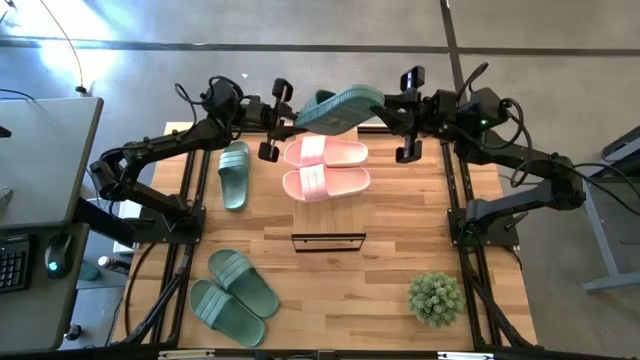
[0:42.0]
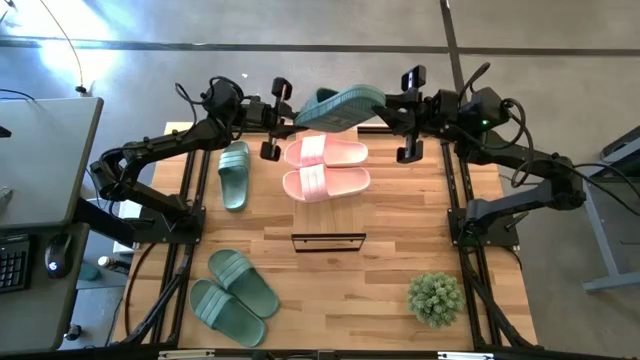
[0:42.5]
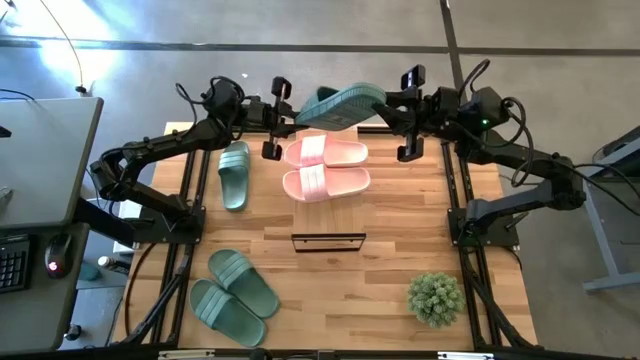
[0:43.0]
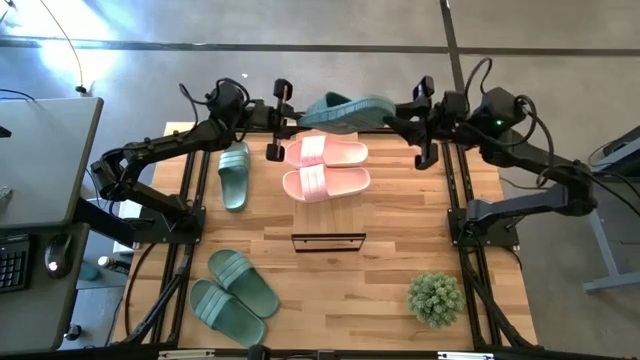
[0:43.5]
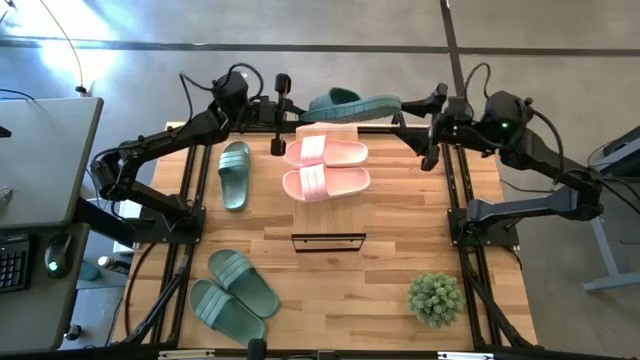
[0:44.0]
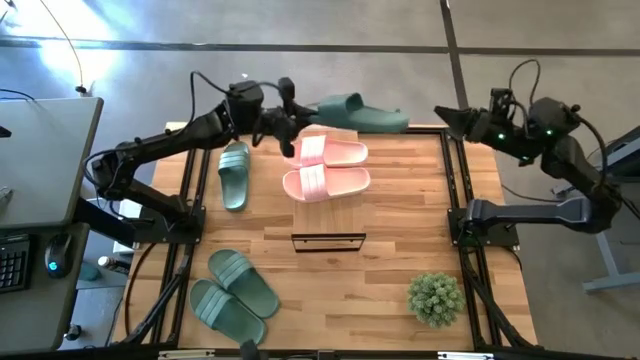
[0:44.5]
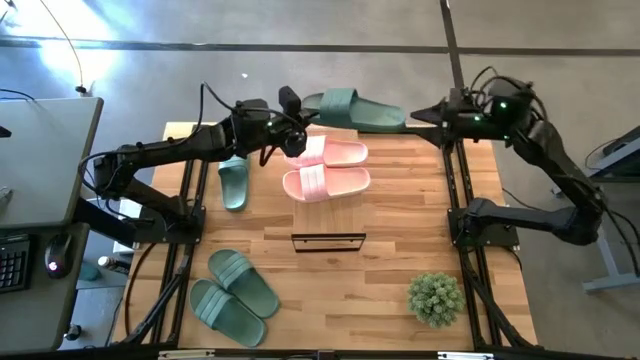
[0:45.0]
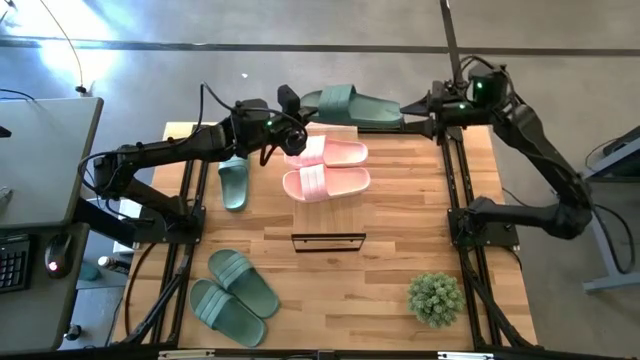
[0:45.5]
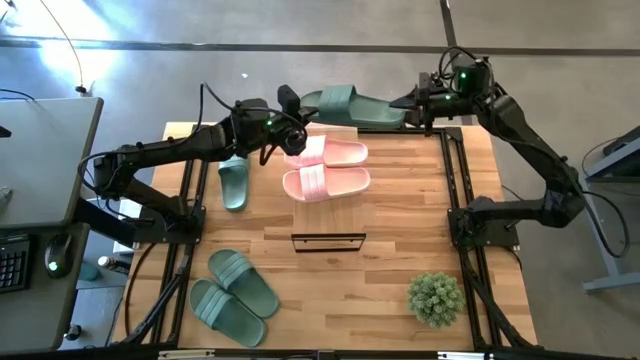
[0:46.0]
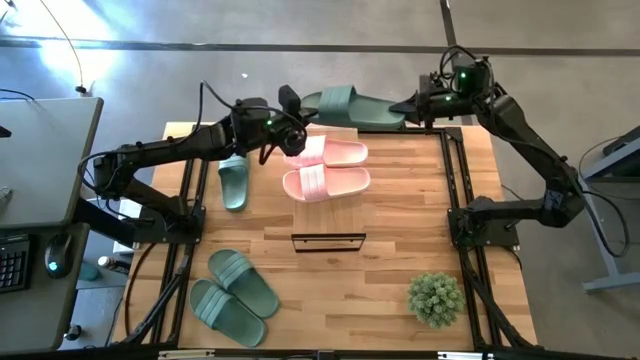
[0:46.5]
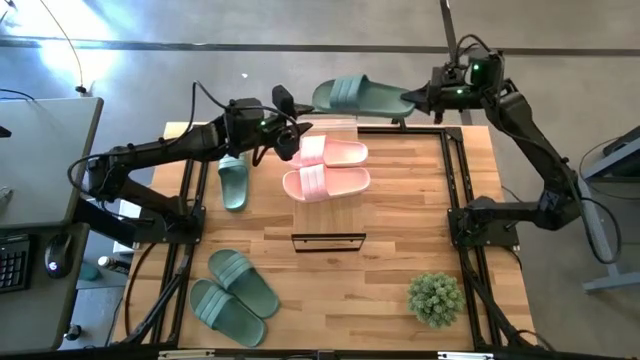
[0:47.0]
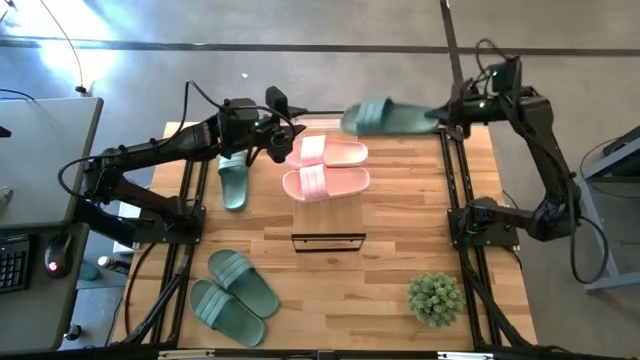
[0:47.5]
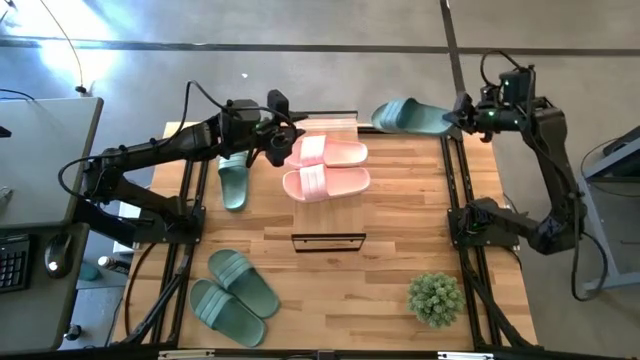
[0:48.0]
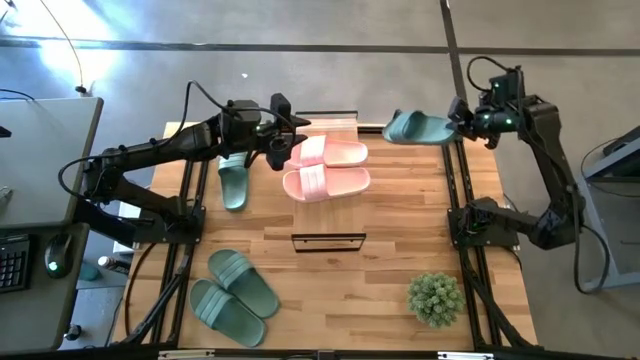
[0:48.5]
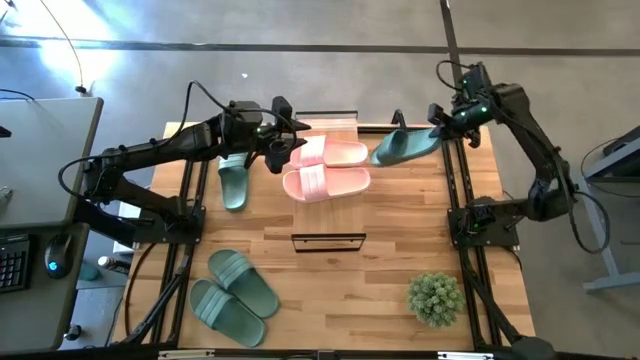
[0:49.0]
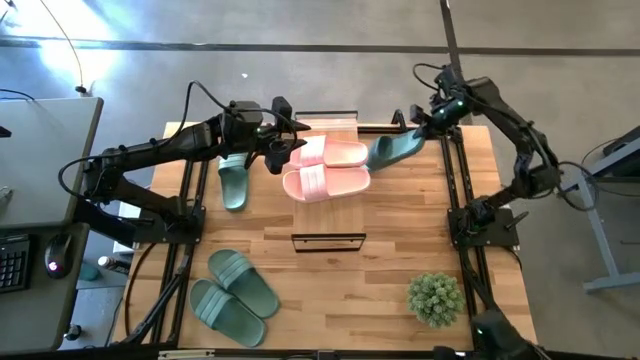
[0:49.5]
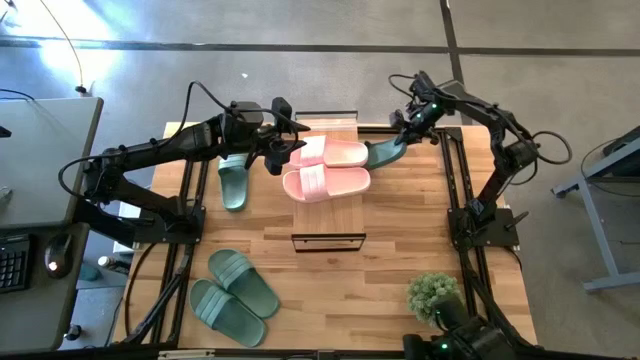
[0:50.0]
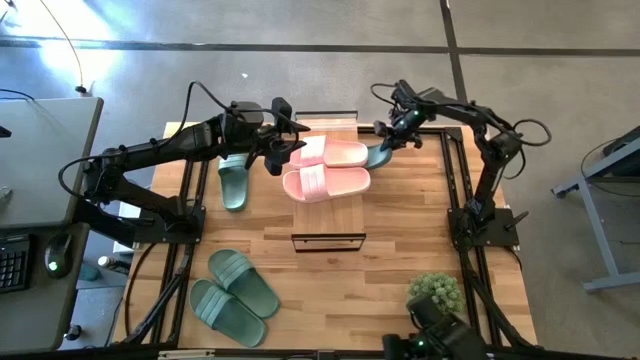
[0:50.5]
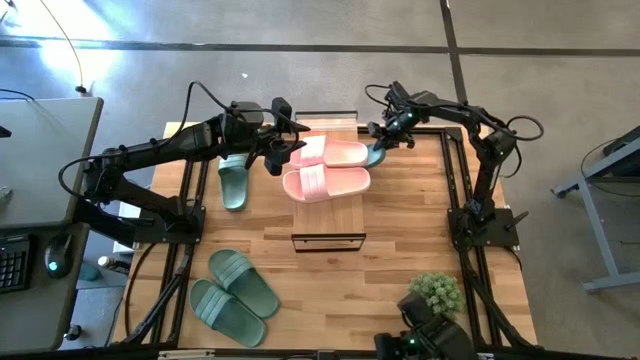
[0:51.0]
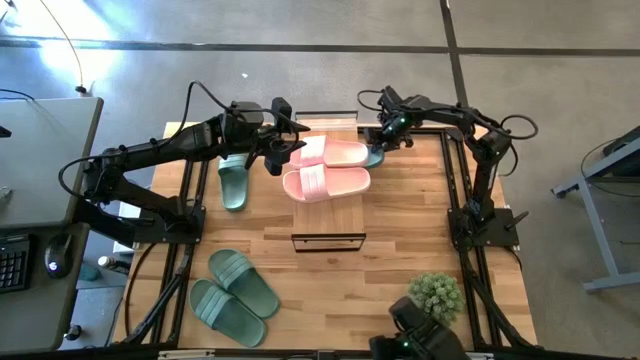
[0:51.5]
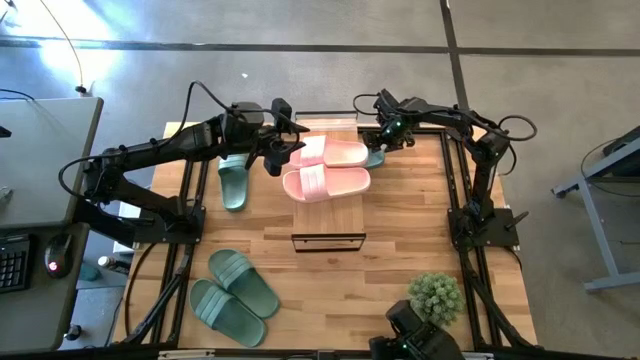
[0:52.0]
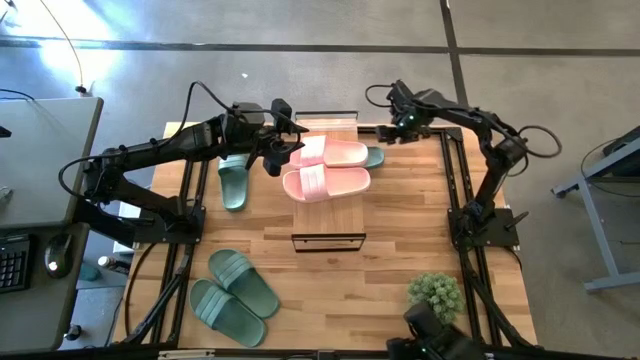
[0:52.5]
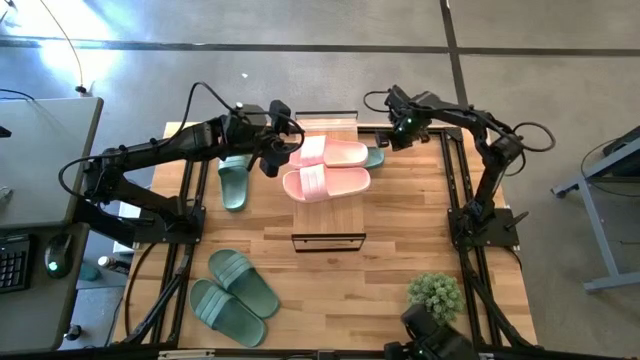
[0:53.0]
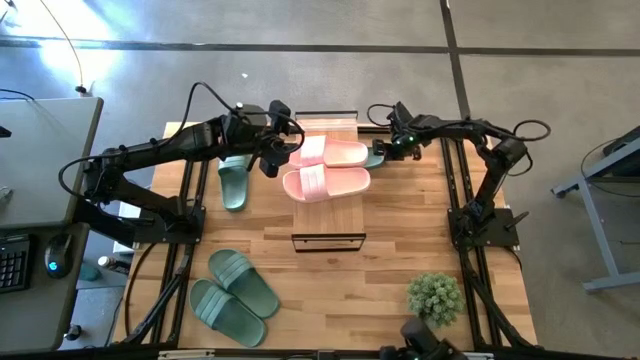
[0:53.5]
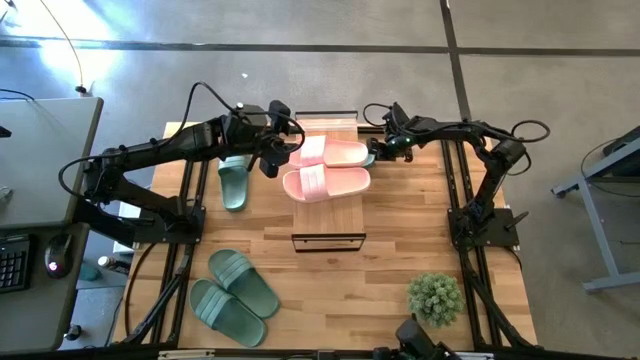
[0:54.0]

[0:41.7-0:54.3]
Task: Pick and place slides into the shelf
Put the green slide under the shelf

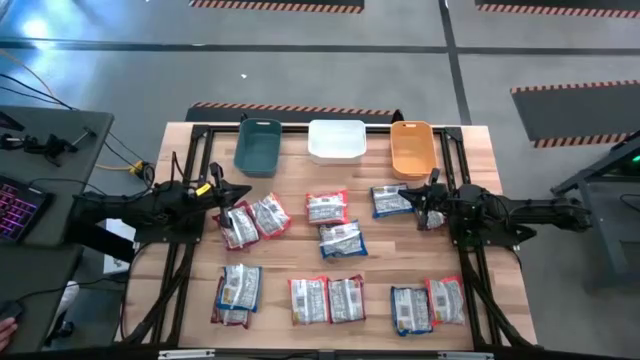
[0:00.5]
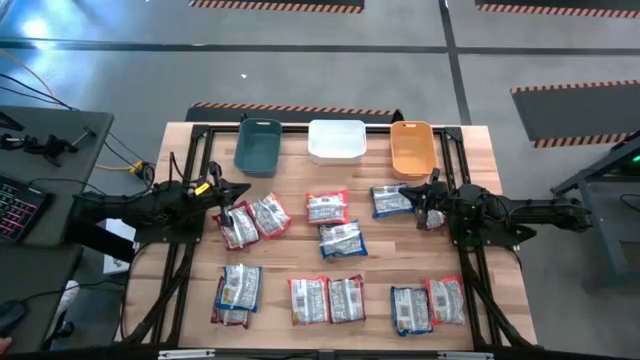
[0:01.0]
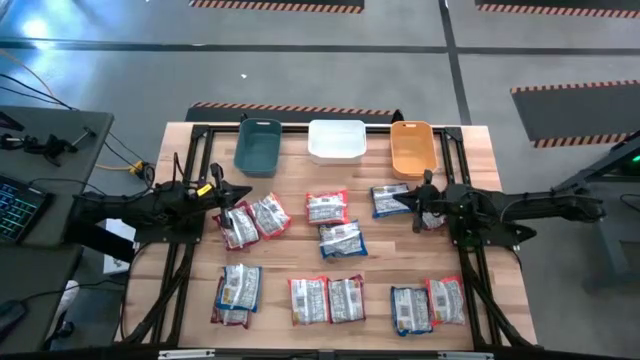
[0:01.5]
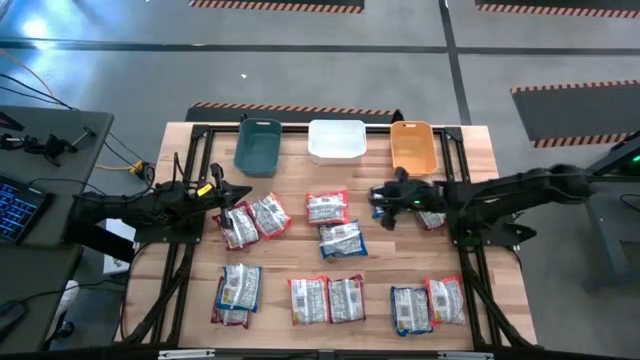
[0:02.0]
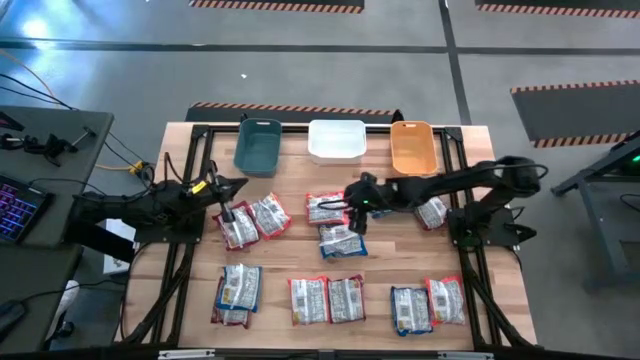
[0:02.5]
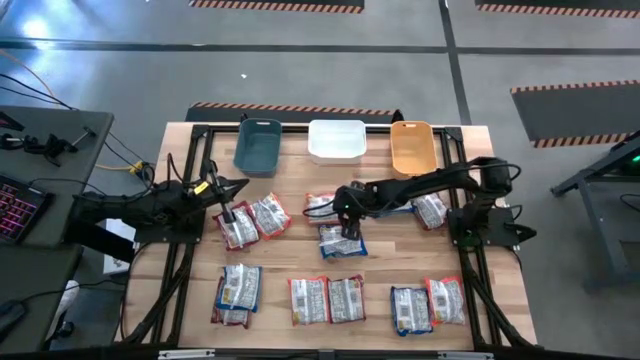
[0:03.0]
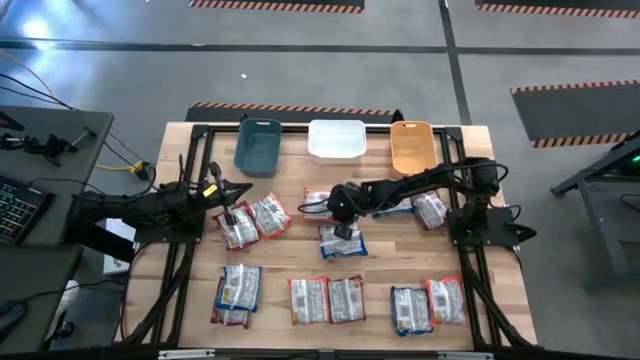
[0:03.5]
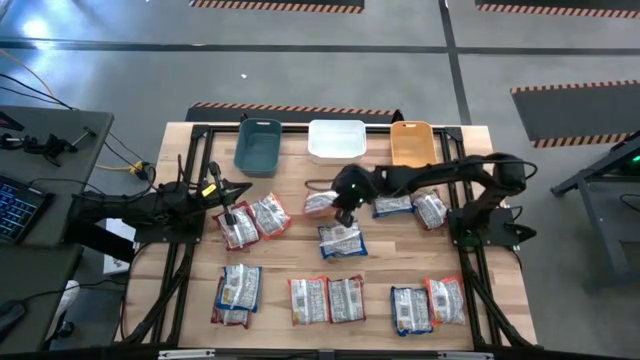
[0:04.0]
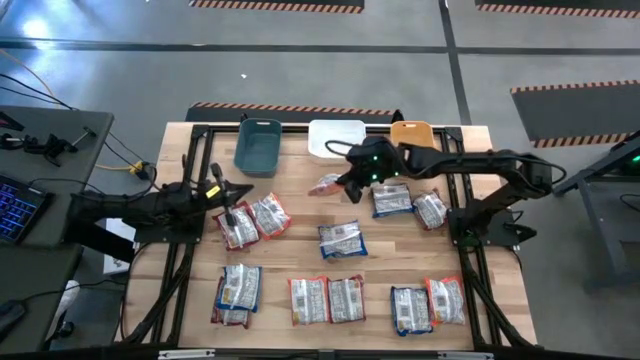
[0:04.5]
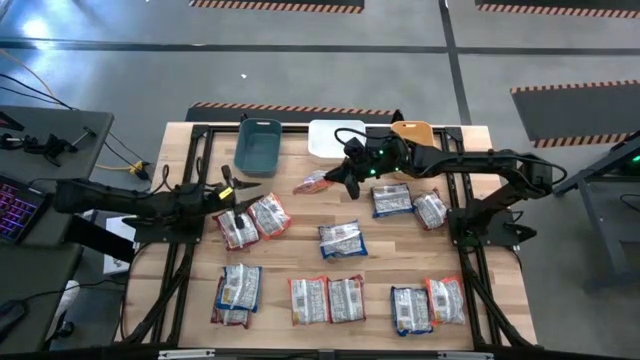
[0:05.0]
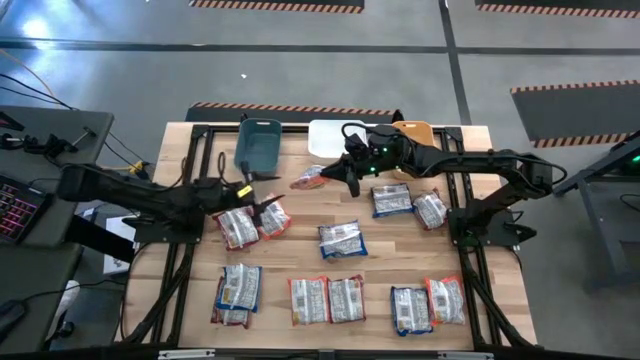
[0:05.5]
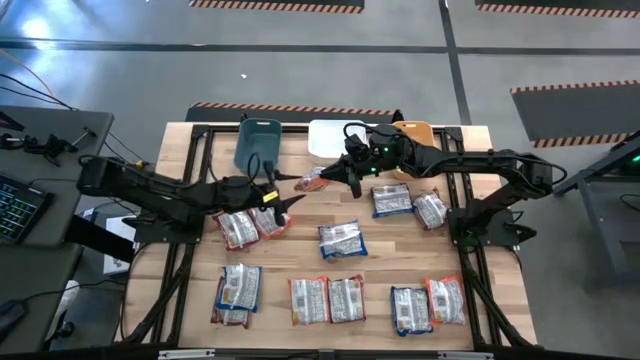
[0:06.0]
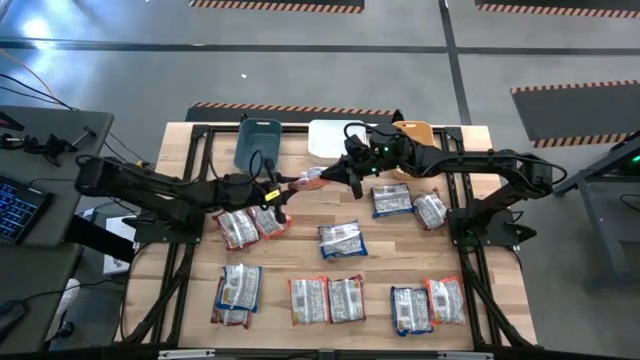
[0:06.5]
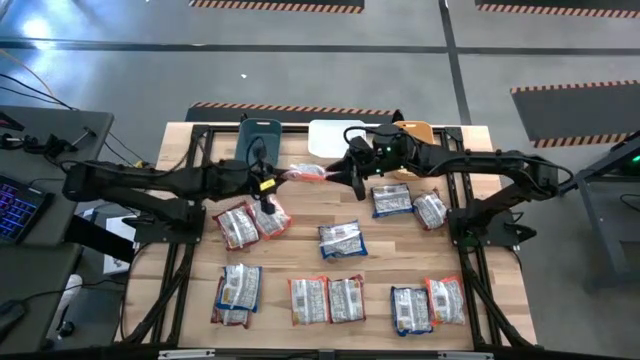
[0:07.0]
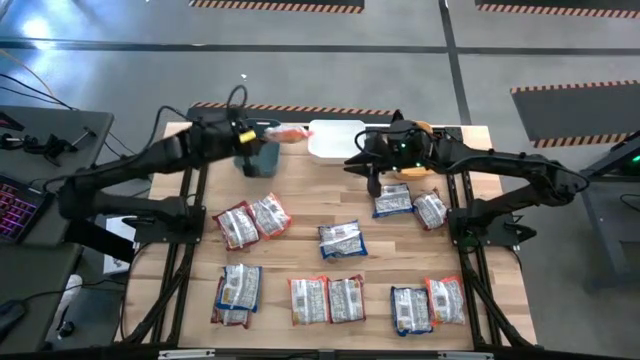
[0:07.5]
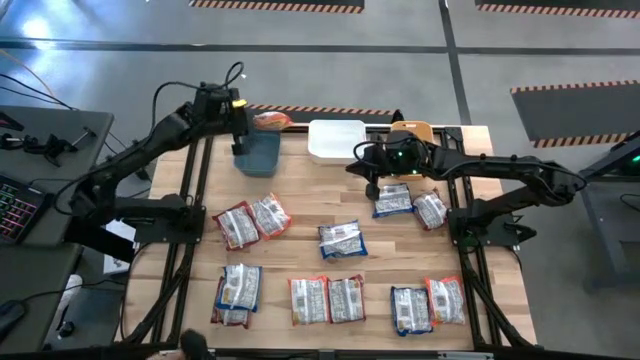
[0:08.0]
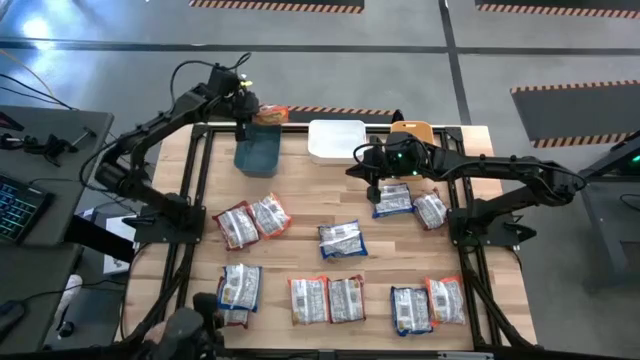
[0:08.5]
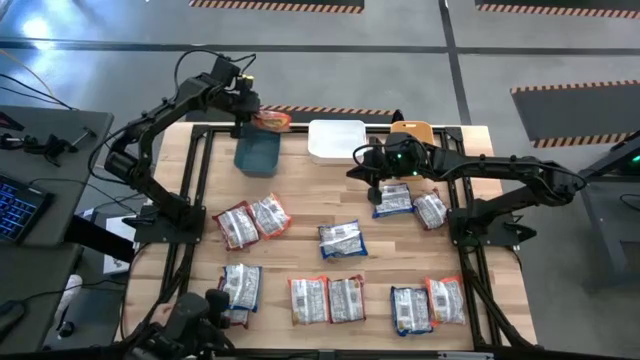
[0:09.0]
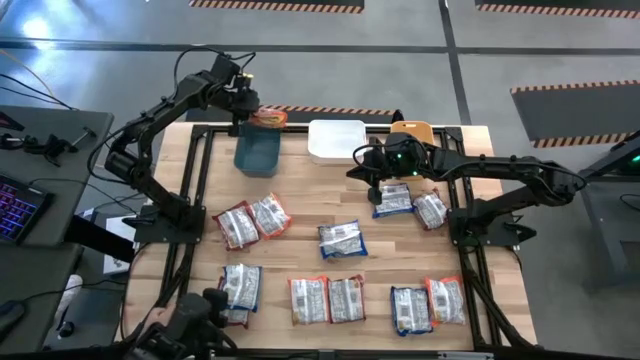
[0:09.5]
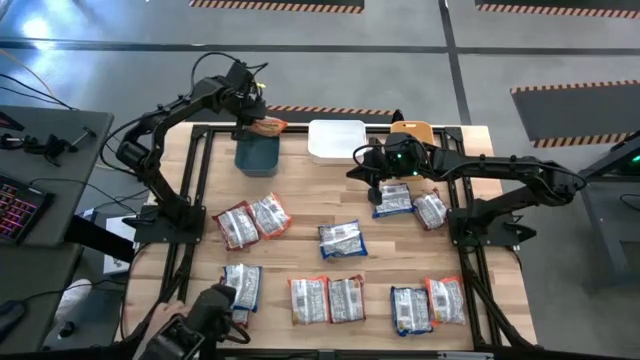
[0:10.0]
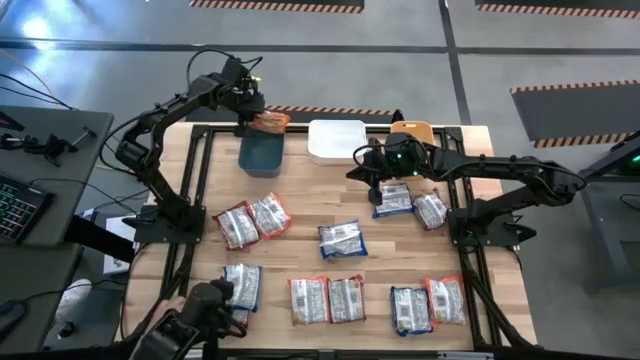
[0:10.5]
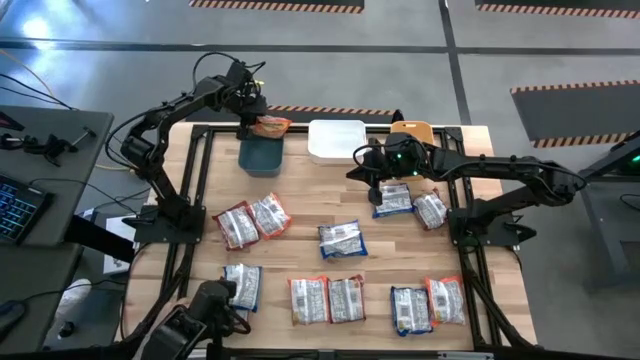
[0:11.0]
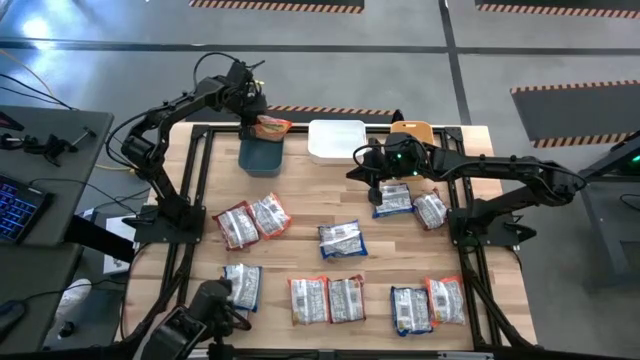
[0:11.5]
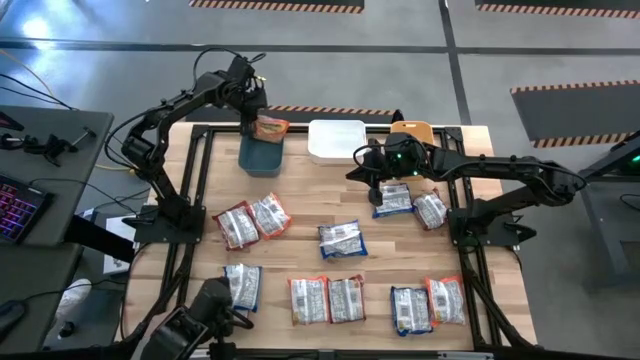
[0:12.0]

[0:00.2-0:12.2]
Task: Sort Maruchan noodles
Put the top right orange noodle pack into the blue bin
